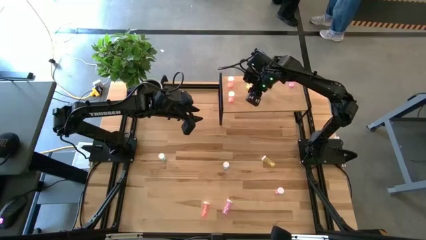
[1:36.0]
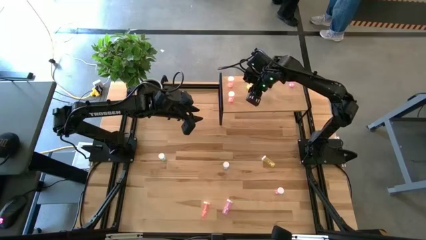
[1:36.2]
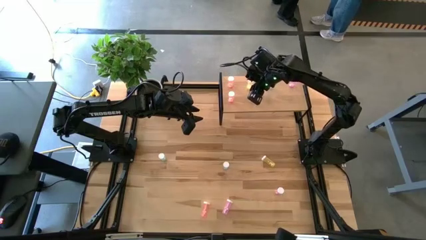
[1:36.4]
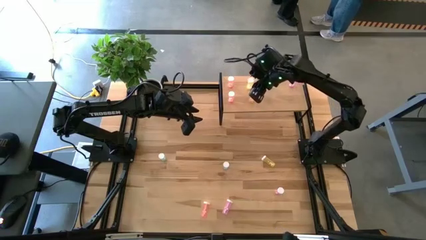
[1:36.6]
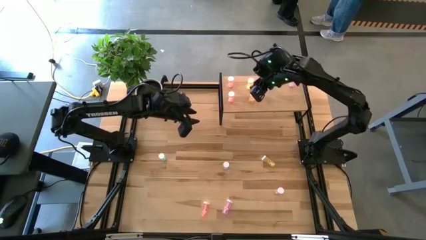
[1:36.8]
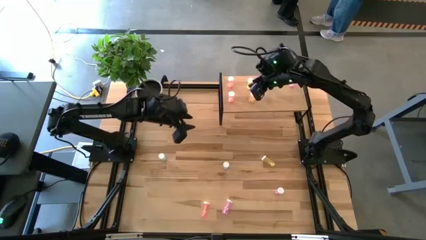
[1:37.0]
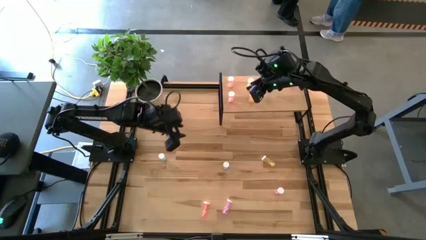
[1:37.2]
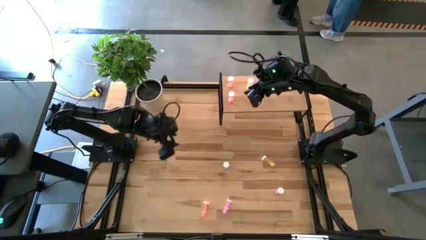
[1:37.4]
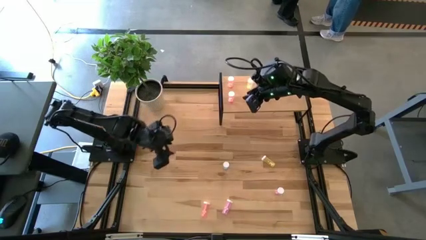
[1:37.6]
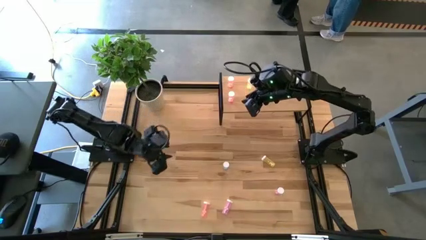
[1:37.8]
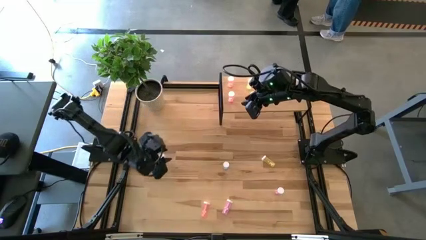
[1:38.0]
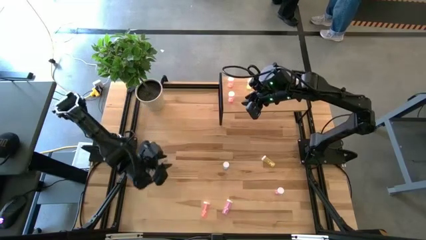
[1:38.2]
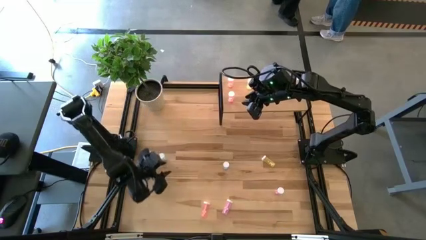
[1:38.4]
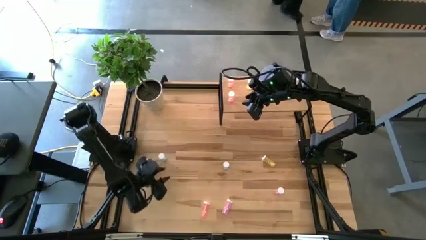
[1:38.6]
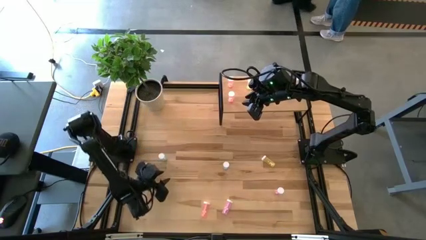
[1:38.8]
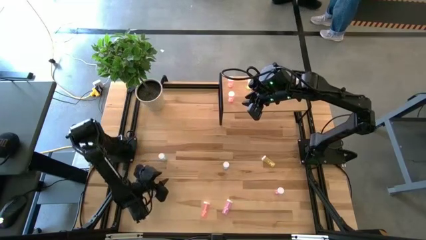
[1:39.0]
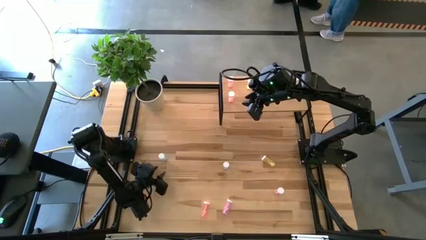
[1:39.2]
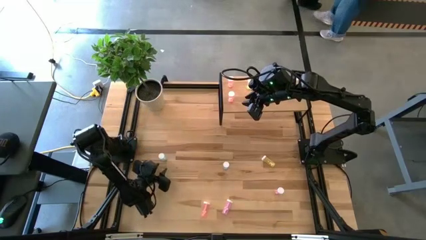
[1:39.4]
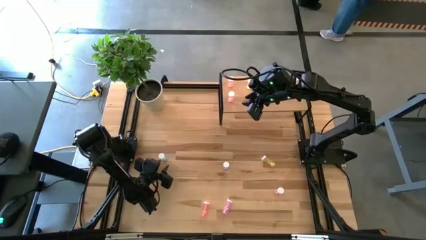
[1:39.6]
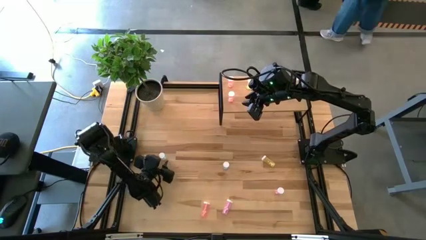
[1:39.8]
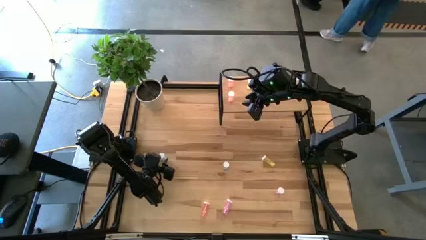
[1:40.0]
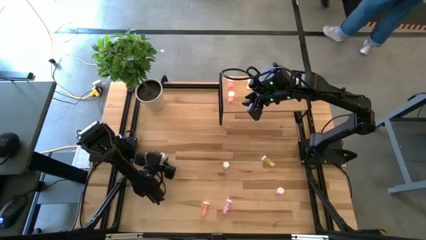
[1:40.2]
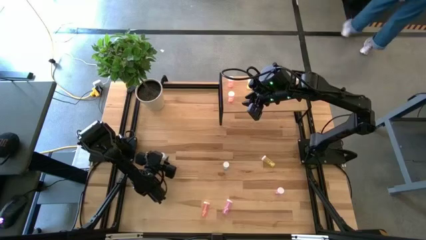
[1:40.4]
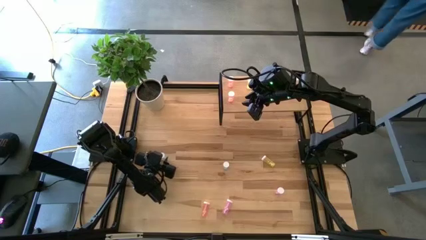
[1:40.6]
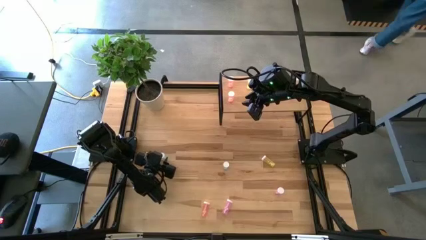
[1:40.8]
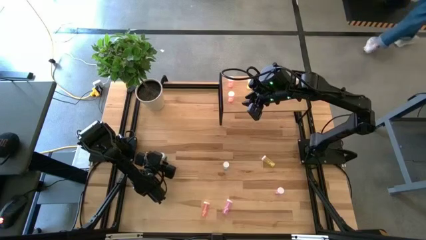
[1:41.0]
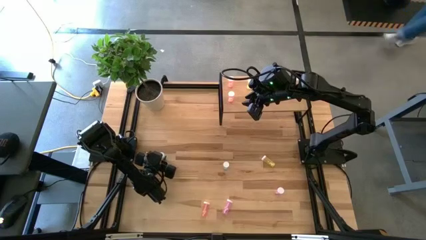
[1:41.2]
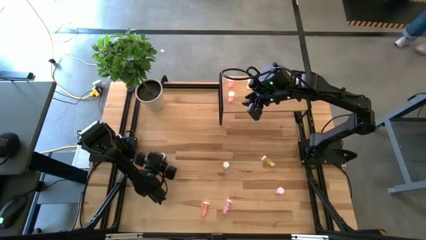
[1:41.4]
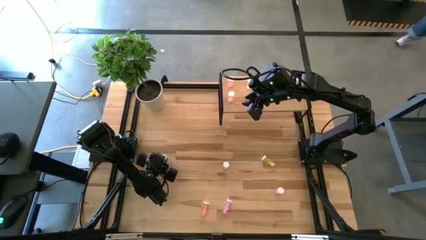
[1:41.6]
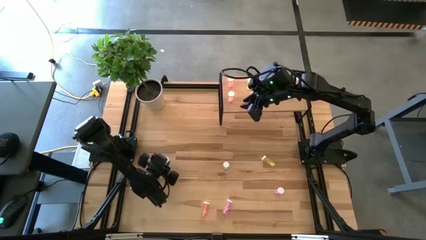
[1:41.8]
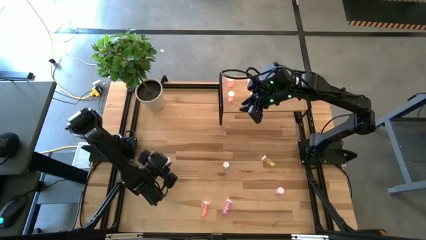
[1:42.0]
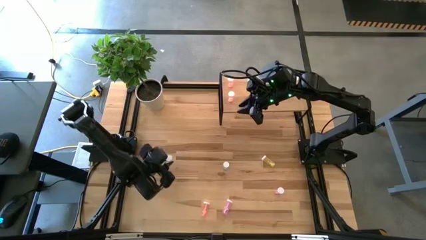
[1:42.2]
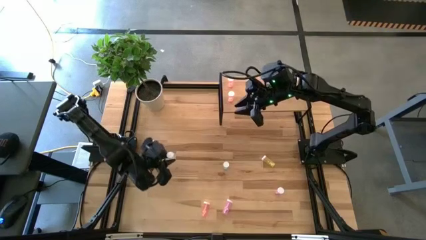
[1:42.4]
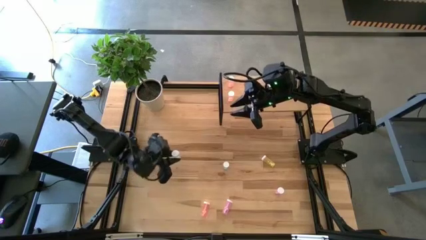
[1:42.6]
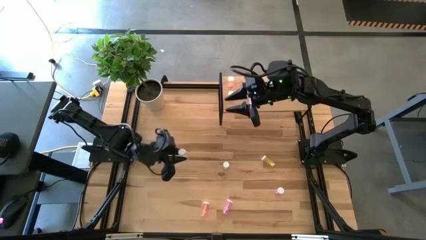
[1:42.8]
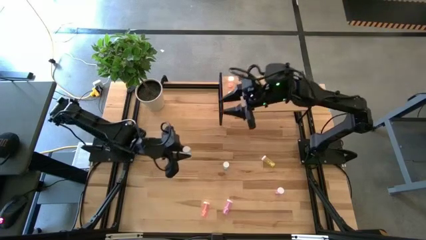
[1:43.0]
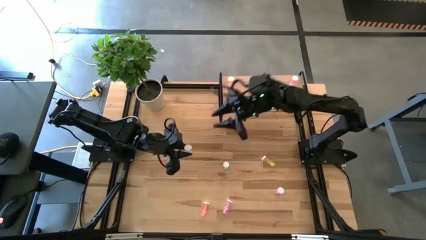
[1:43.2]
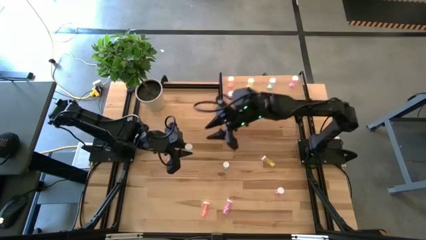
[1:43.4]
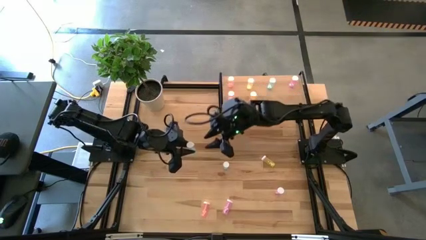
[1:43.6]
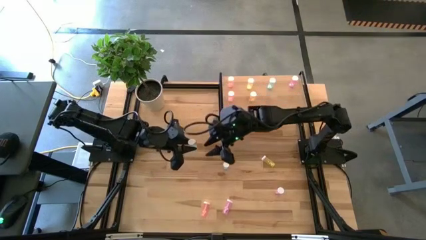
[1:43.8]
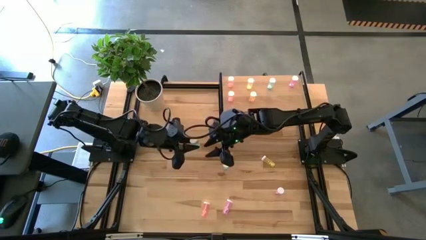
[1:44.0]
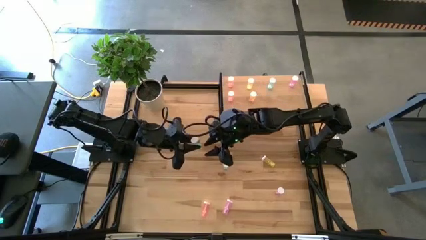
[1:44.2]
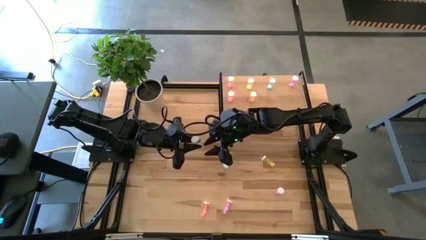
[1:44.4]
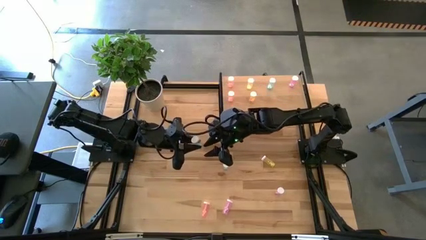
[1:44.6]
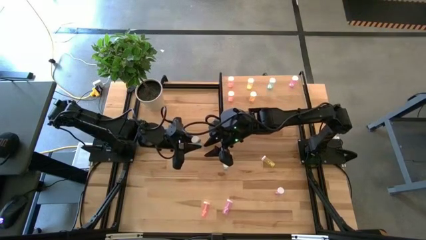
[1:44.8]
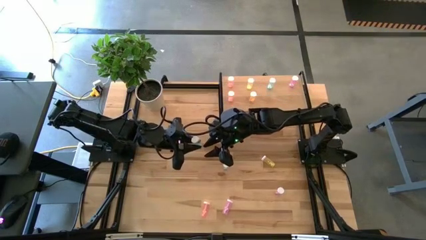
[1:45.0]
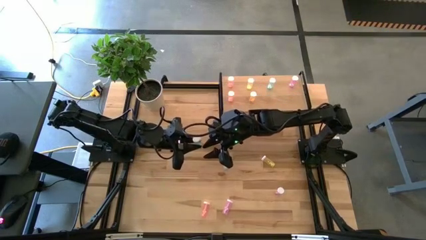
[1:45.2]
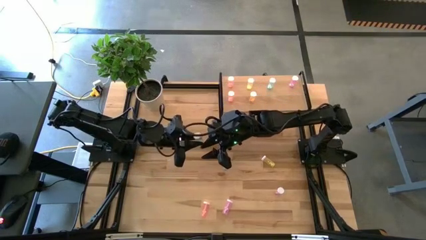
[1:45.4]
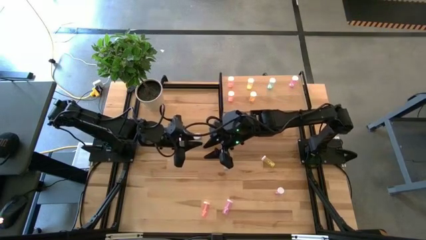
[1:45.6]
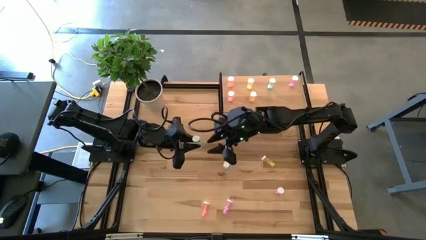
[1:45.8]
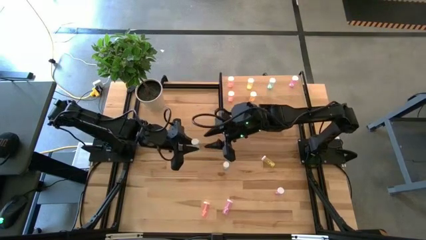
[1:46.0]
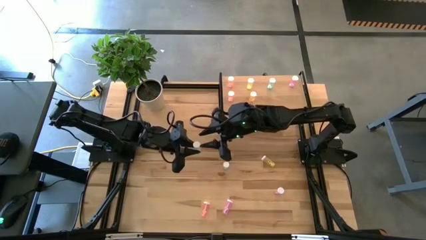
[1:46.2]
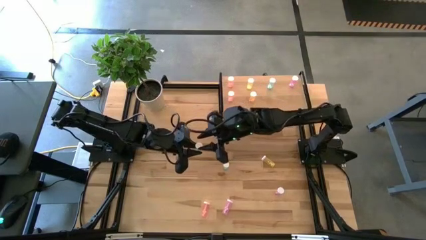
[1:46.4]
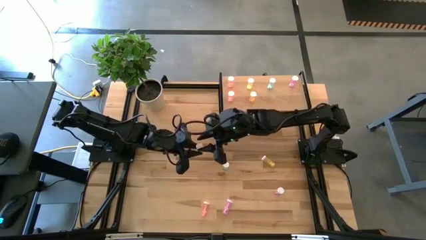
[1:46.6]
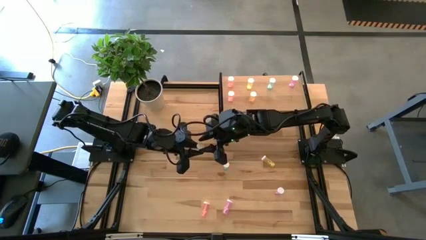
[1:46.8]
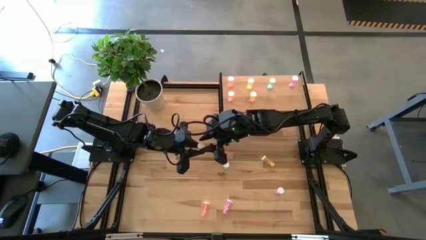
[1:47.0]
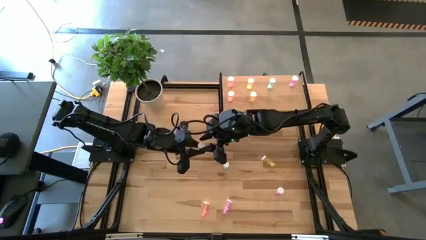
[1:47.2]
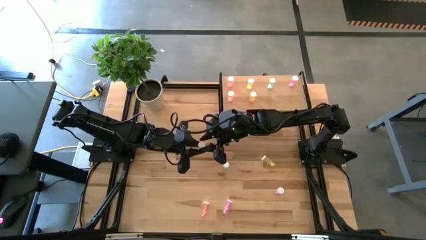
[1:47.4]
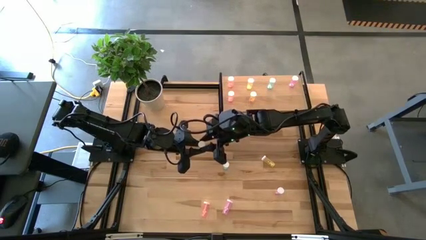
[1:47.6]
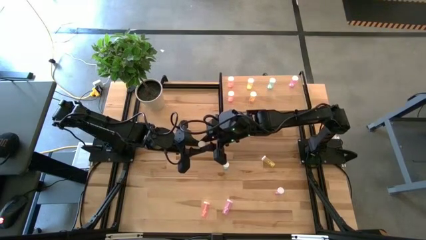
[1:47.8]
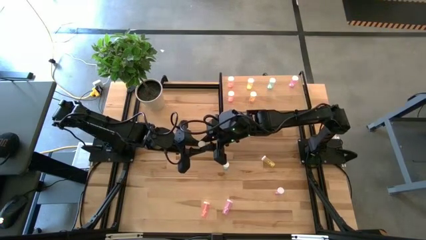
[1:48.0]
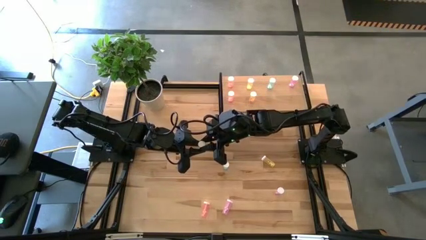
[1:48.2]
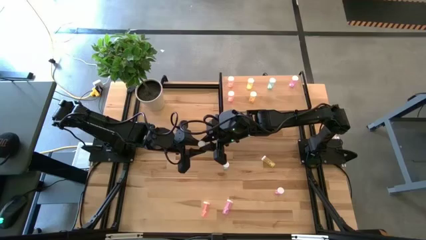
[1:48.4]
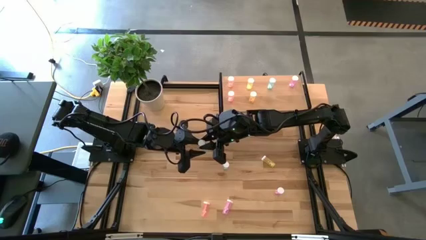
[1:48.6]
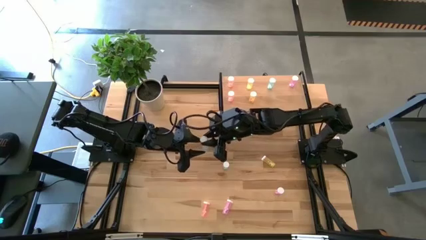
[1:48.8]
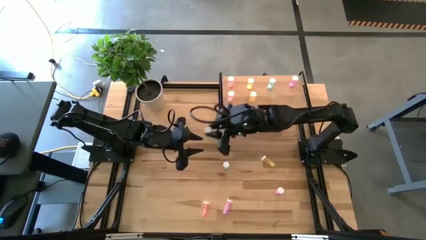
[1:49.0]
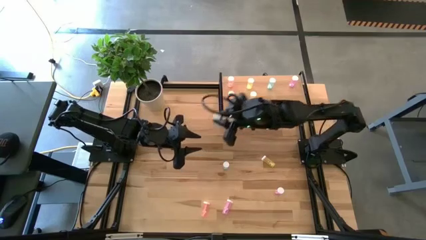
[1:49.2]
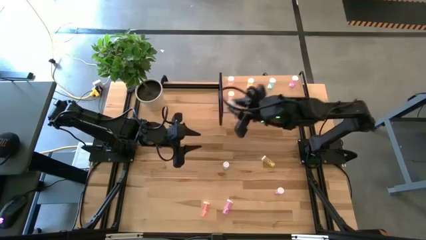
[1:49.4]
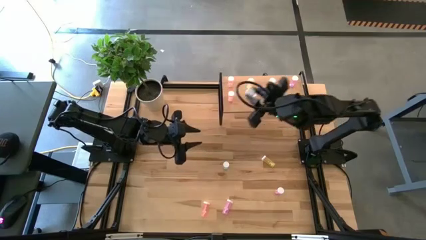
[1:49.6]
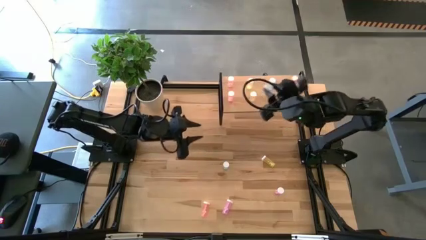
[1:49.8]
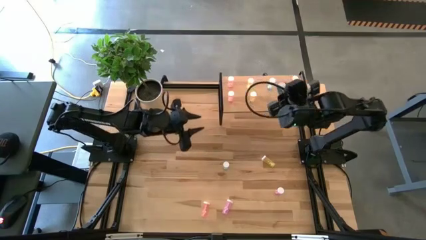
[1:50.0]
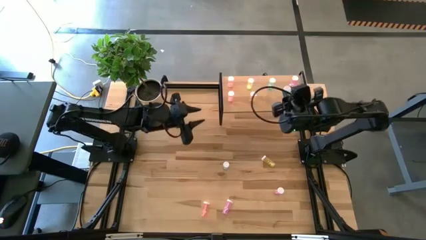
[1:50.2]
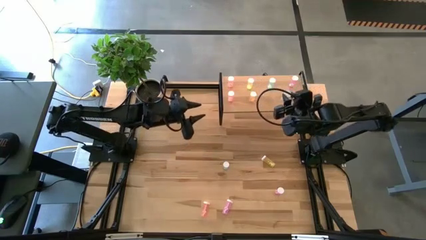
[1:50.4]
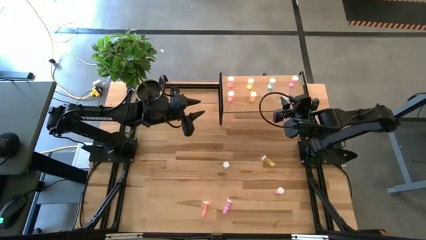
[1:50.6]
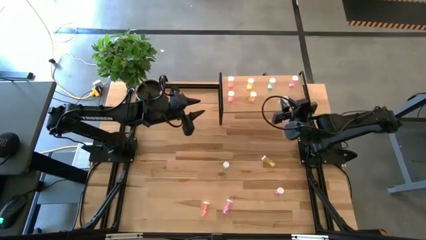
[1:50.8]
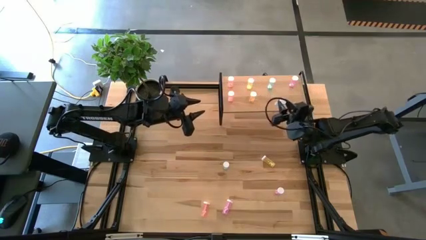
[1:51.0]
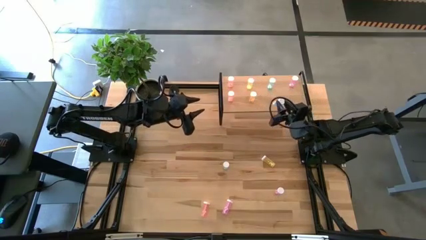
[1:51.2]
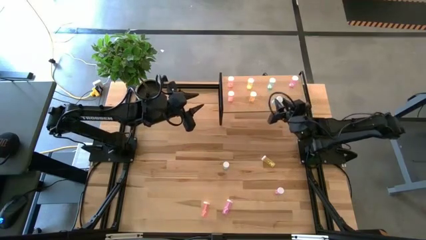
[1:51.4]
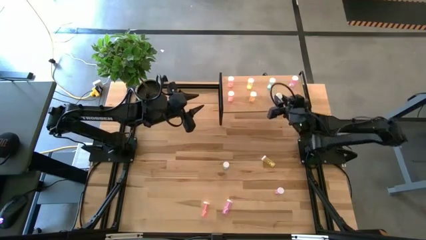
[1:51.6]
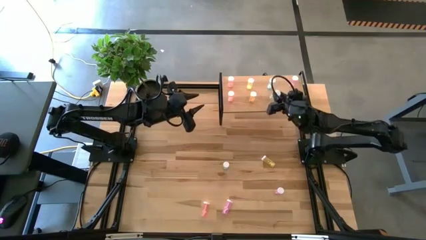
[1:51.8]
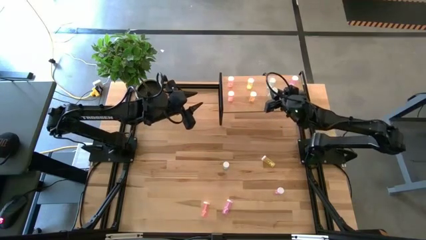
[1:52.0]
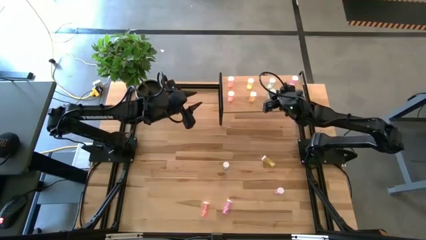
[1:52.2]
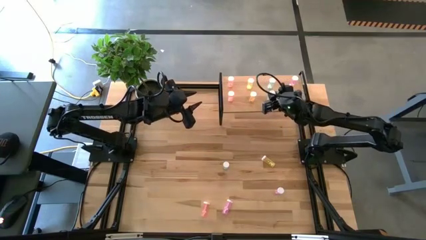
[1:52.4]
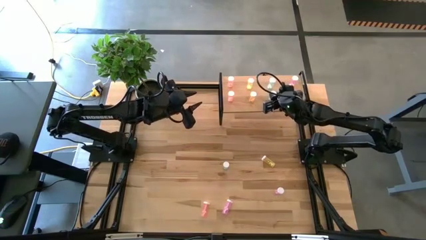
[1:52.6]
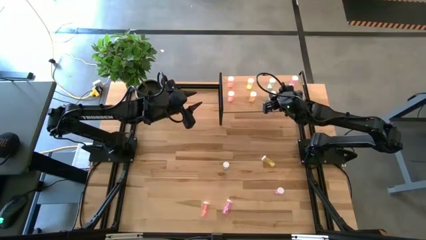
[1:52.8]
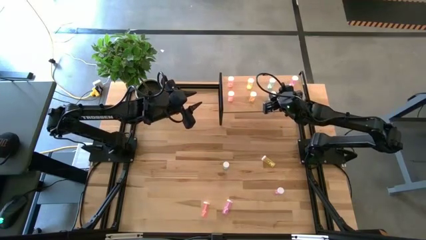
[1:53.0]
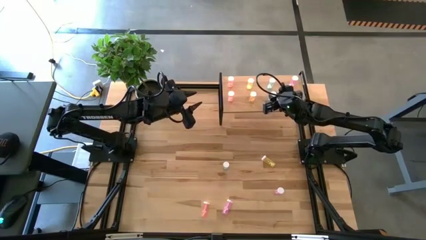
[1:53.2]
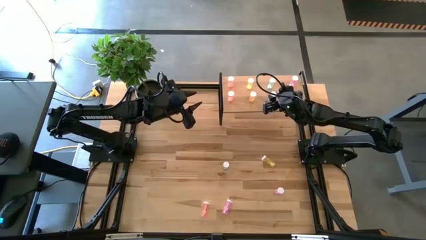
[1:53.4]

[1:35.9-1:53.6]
Task: Pick and place medicine bottles onto shelf by color
Put the left blue pill bottle on the shelf aligned with the other blue pill bottle
